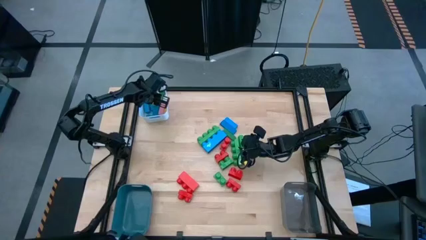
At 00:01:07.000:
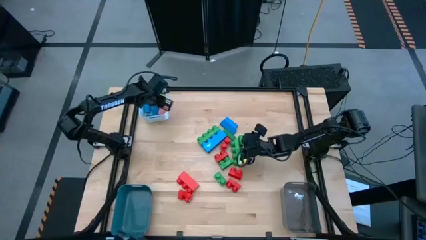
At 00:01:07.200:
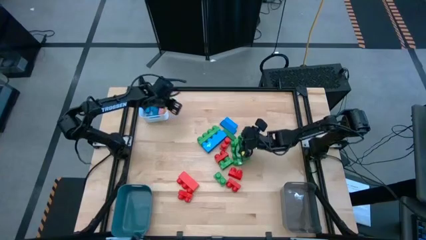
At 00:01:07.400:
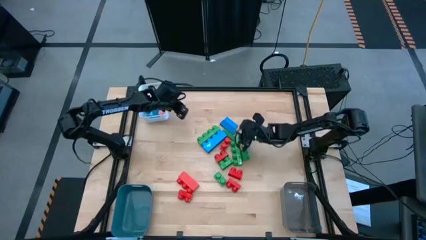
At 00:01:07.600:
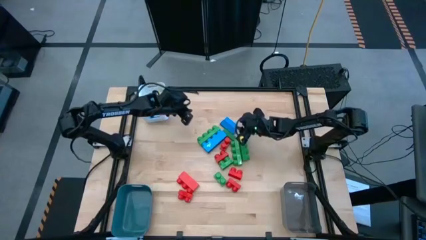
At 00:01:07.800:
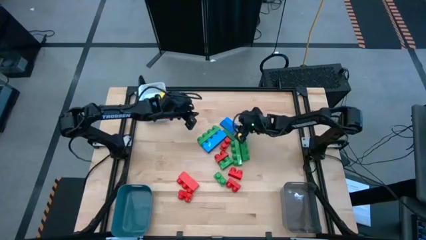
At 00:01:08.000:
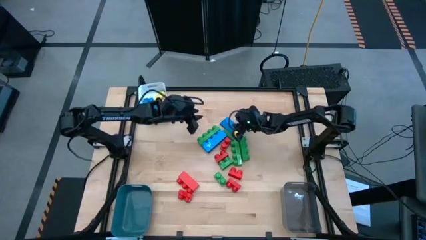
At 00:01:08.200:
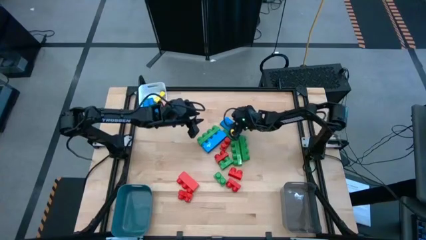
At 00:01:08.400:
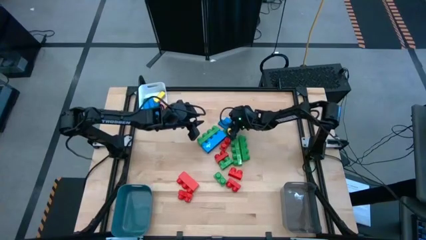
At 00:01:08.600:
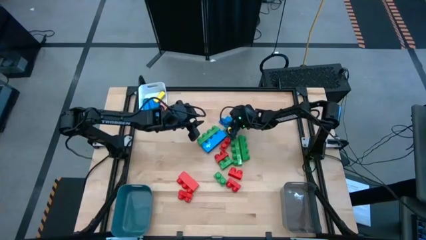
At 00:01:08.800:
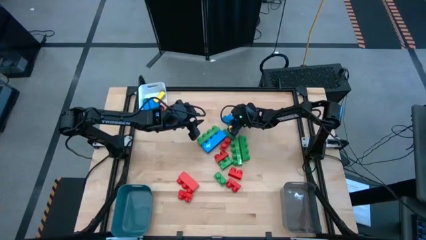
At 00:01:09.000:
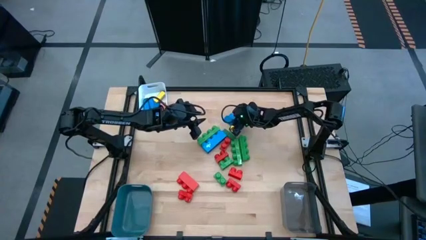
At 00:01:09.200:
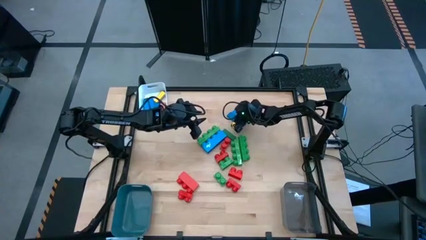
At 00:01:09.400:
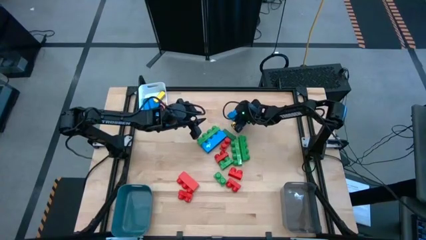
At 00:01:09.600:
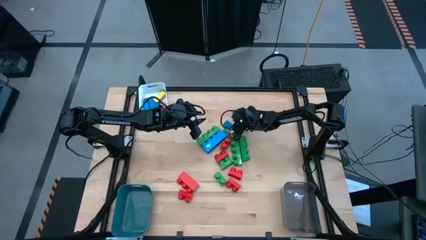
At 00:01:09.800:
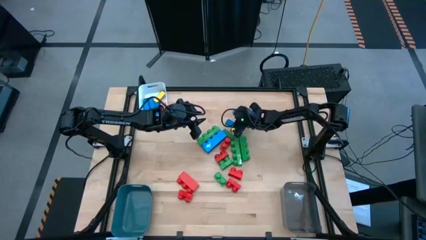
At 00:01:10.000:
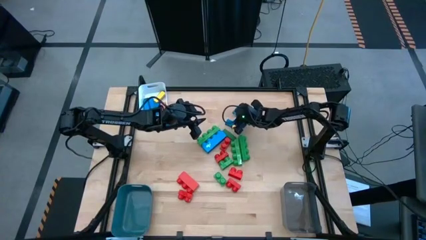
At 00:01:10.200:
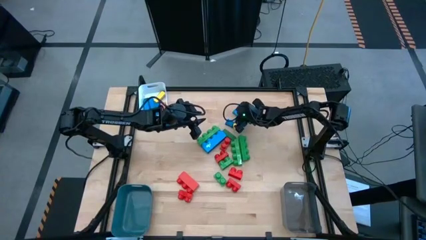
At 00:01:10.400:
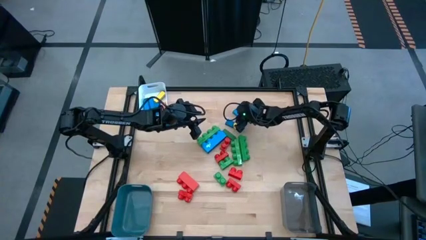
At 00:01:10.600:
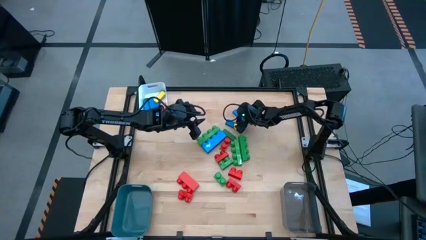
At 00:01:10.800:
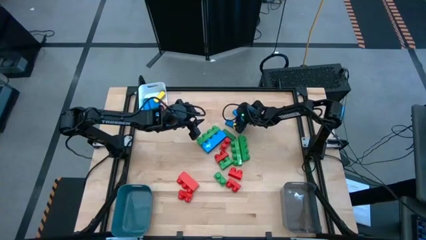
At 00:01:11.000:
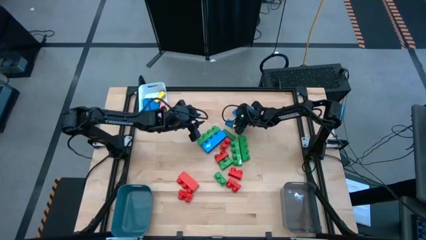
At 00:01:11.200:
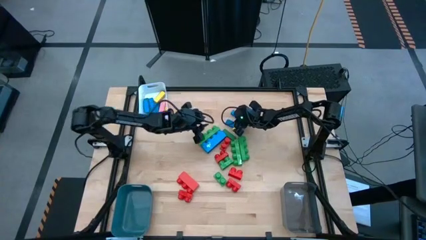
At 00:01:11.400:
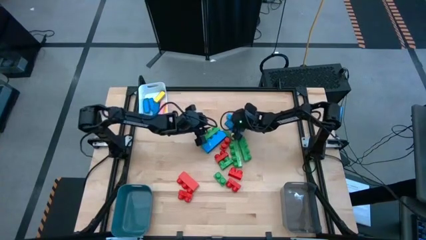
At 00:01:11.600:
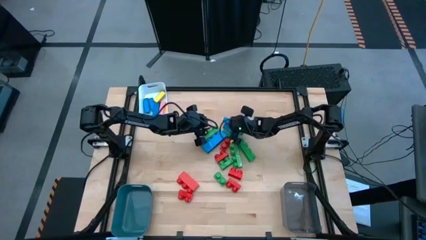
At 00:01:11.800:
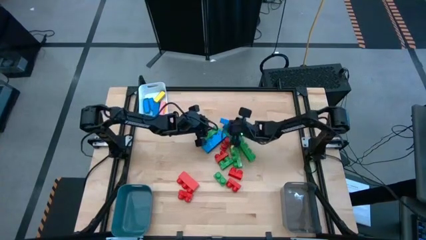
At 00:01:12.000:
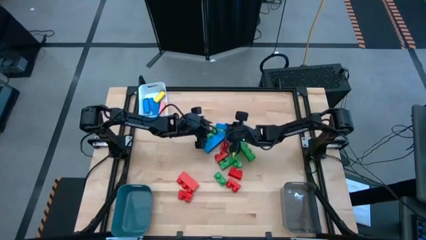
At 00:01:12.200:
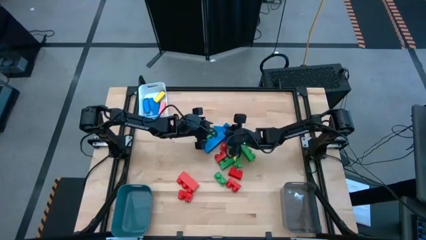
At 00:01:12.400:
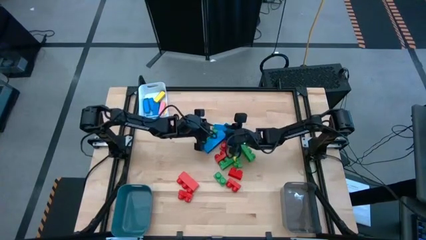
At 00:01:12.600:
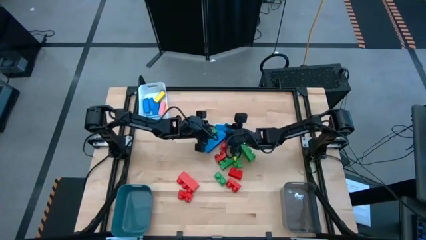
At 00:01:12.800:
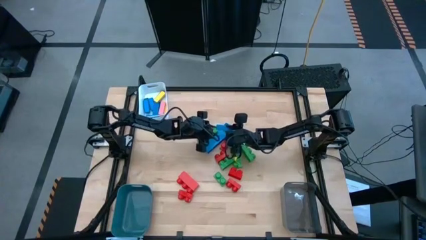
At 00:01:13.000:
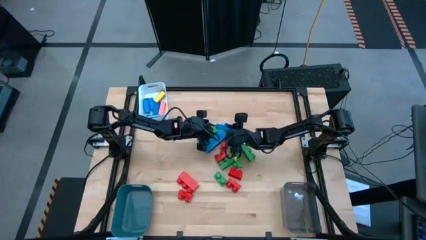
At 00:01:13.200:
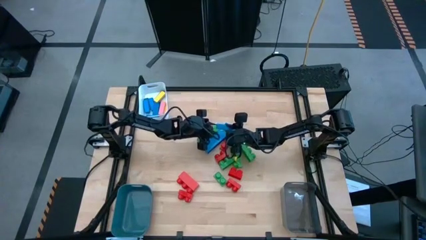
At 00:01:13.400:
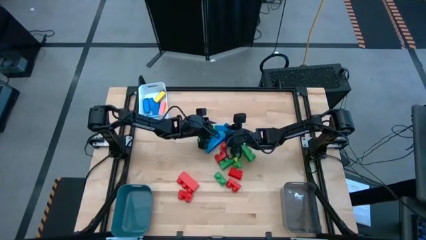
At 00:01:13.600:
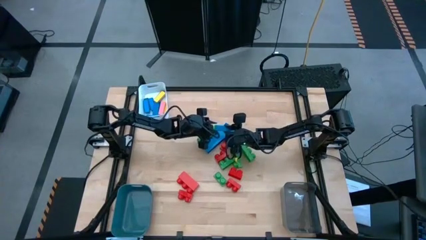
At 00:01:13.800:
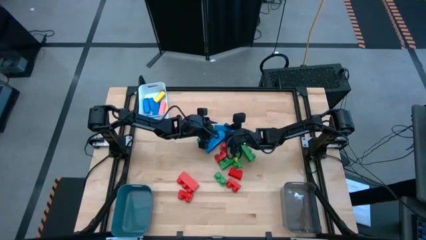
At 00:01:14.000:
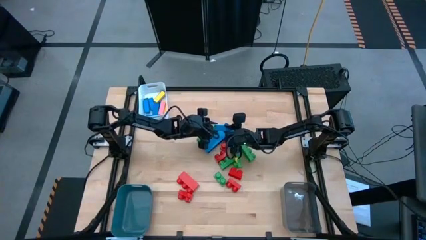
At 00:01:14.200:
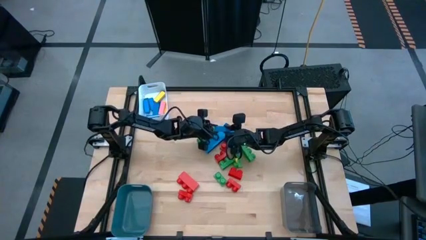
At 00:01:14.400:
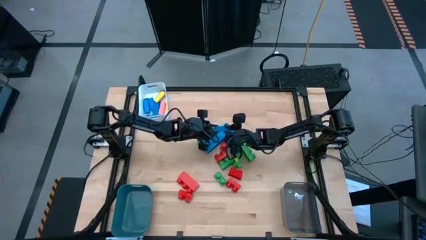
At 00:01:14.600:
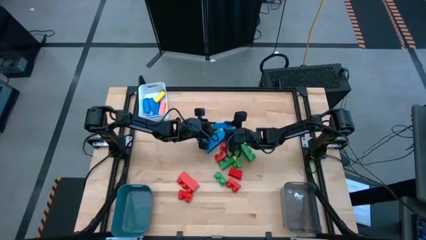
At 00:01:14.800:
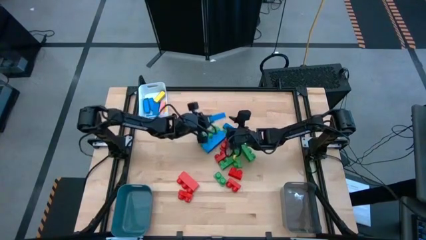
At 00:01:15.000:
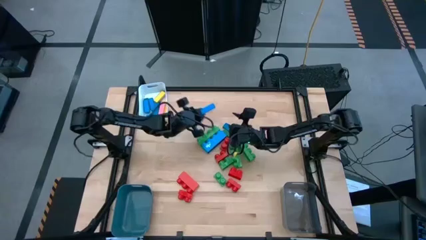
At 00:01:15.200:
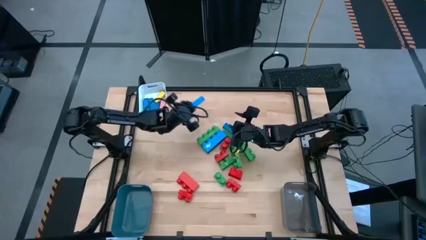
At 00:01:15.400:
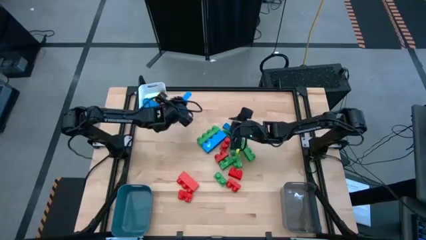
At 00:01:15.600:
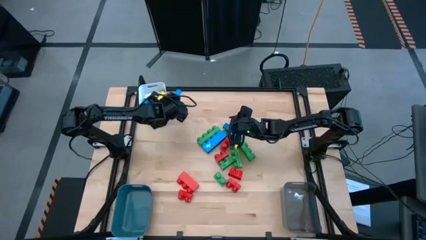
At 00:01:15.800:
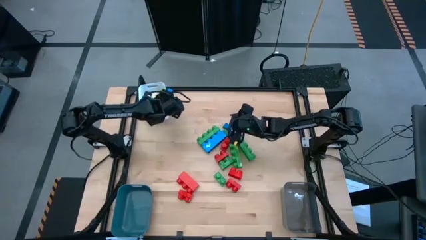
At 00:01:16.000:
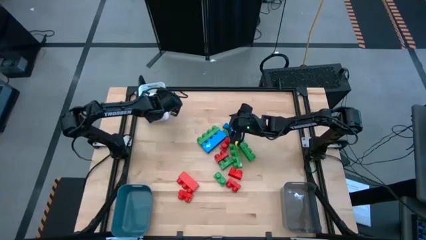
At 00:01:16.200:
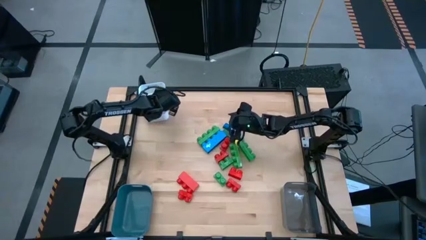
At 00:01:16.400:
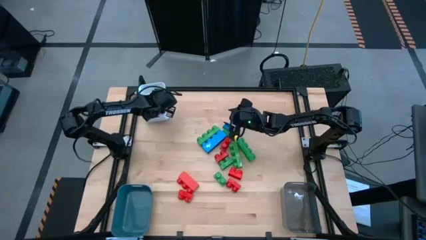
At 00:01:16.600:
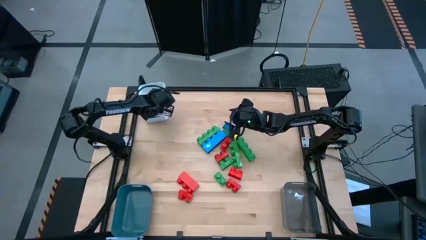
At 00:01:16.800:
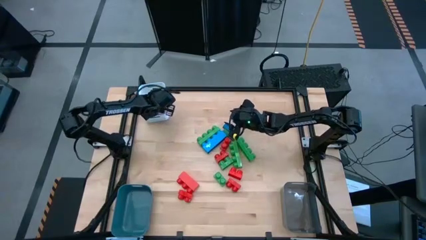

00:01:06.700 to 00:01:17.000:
Task: Sort blocks by size
Put the blue block into the white bin

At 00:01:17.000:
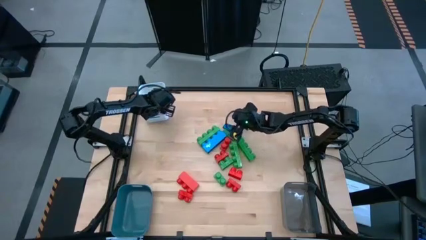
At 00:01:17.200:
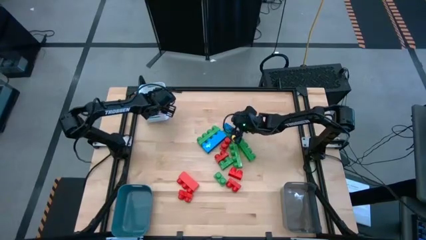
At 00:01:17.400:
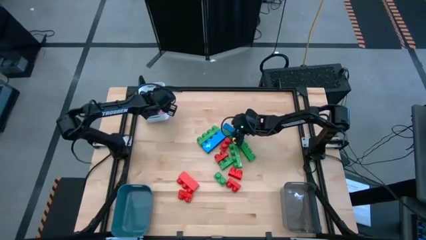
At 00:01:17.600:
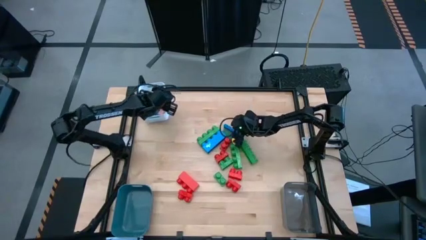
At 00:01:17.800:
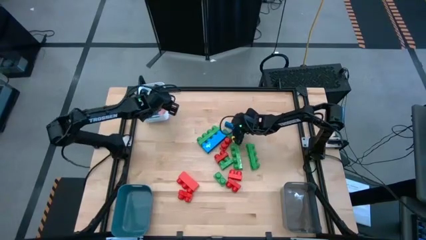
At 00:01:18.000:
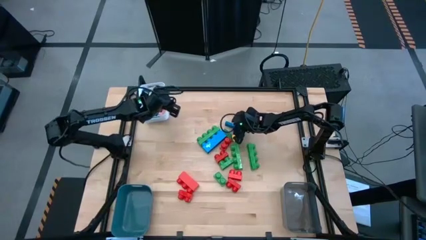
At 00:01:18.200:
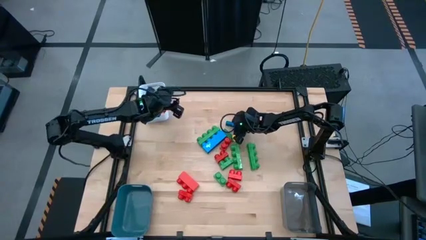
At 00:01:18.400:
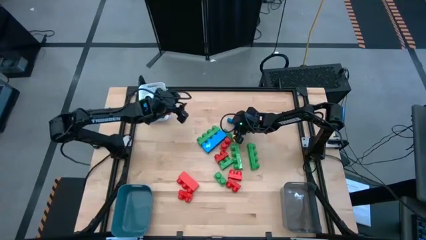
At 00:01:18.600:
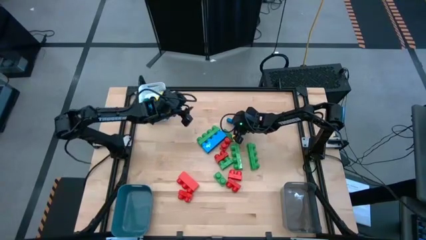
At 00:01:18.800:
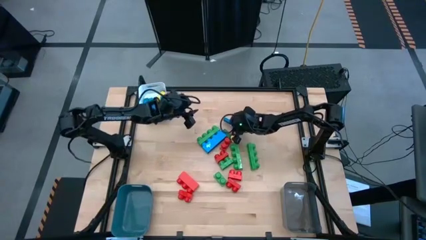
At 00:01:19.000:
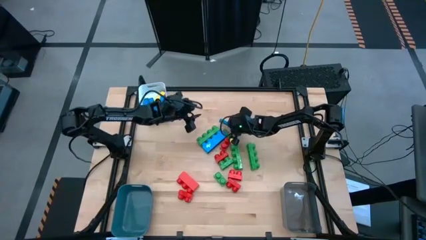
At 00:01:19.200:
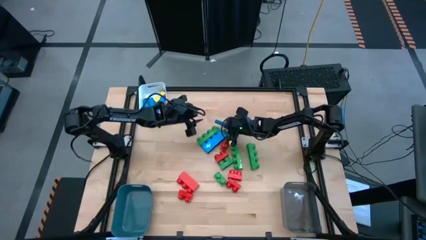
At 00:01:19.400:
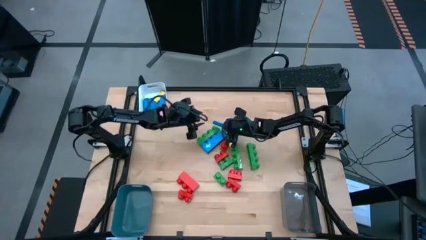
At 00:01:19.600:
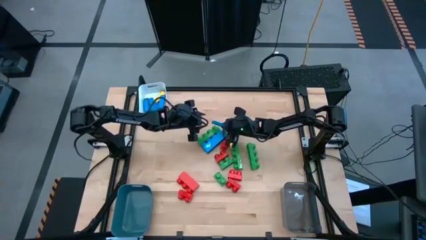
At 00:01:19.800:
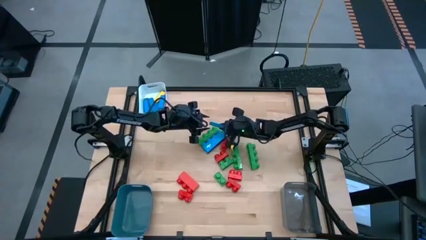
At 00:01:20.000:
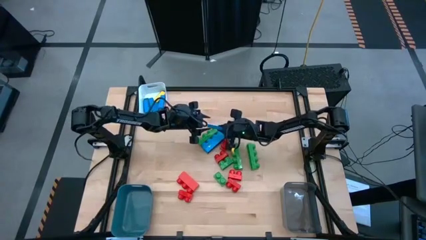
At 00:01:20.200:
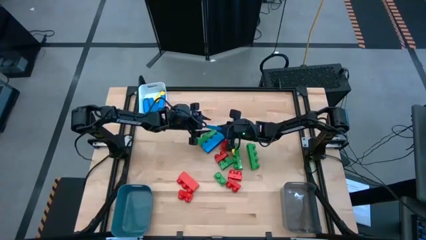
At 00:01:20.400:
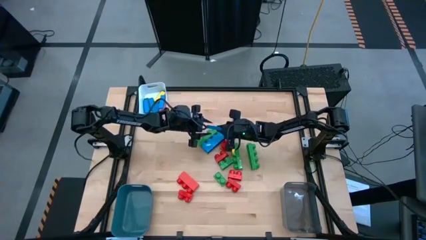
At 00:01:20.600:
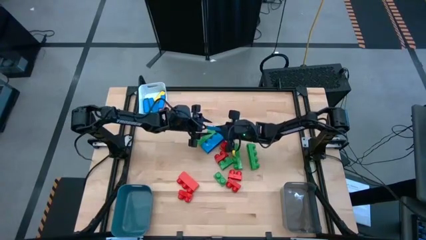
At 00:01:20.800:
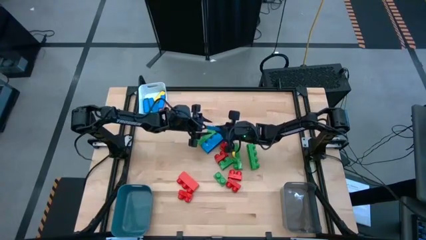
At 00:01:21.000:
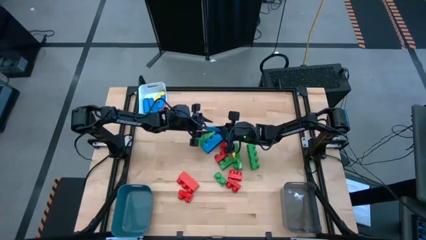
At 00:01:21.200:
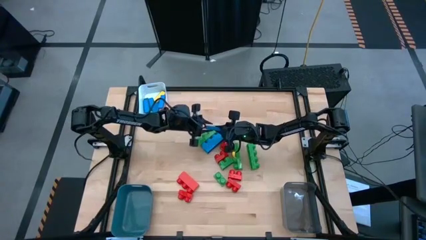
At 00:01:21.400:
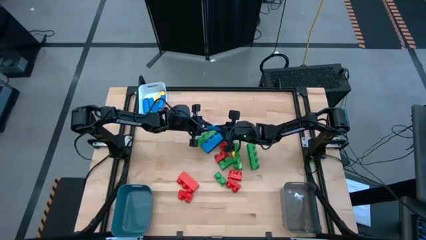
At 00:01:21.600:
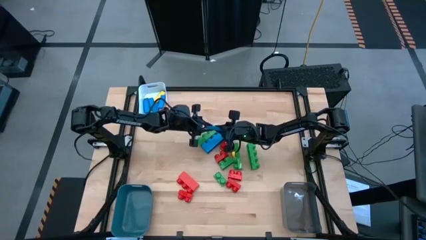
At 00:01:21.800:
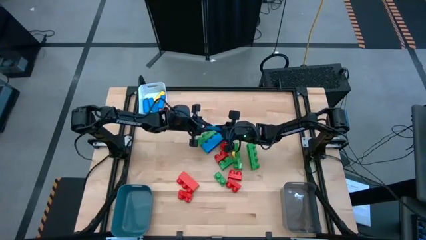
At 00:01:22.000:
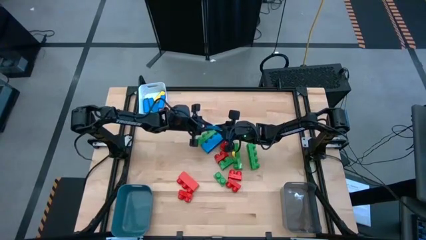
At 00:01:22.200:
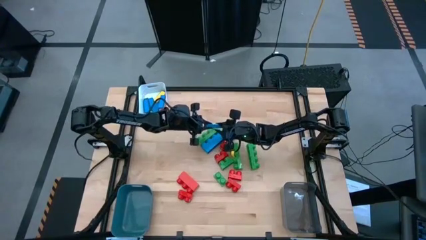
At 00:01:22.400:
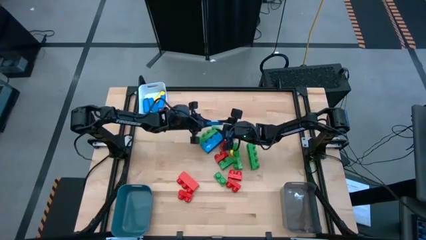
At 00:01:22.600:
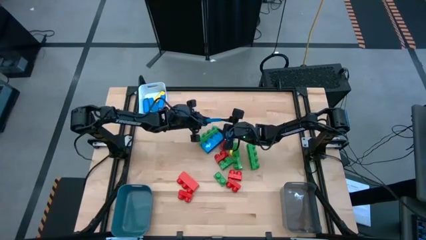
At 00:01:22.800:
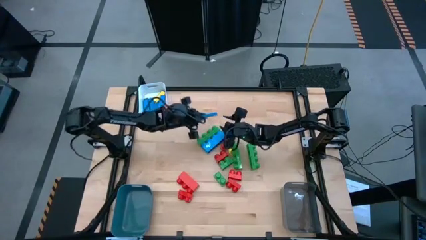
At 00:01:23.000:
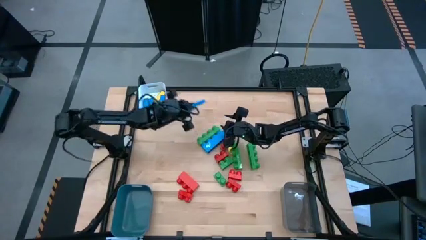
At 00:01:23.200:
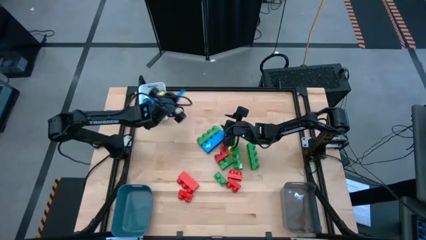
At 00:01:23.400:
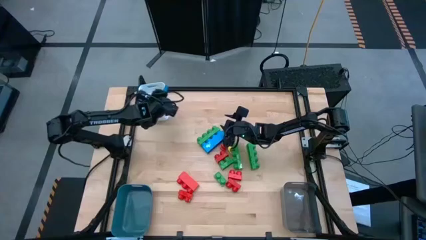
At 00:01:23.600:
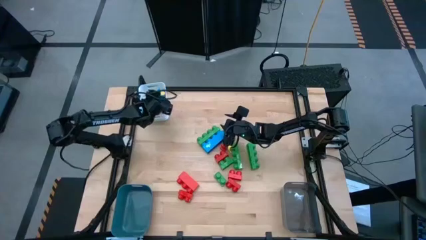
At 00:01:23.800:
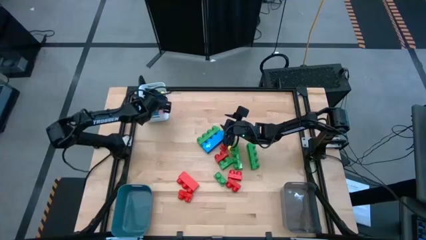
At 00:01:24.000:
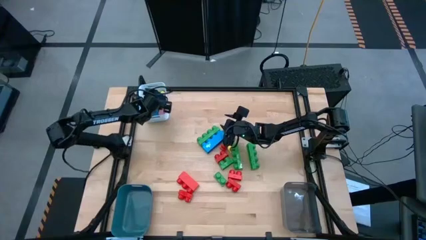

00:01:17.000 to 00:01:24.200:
Put the dark blue block into the white bin
